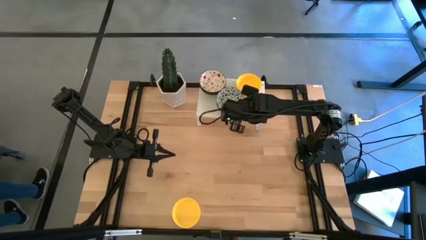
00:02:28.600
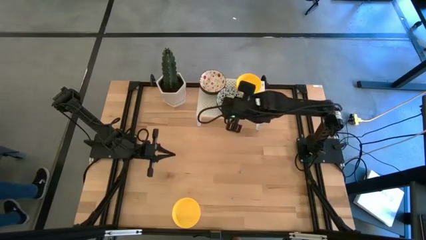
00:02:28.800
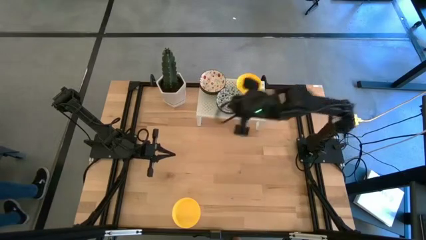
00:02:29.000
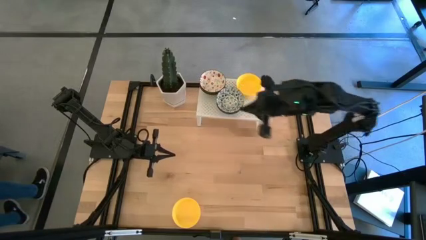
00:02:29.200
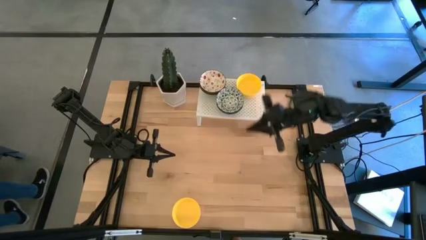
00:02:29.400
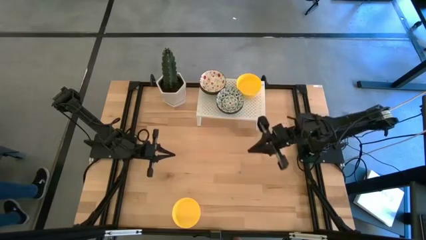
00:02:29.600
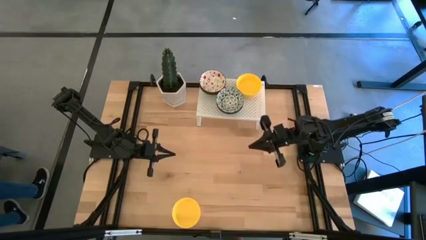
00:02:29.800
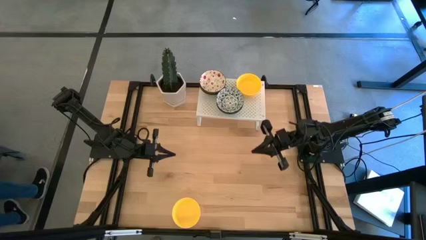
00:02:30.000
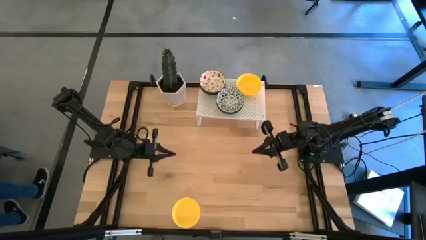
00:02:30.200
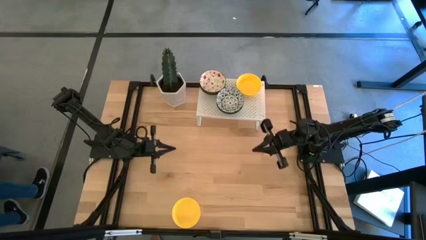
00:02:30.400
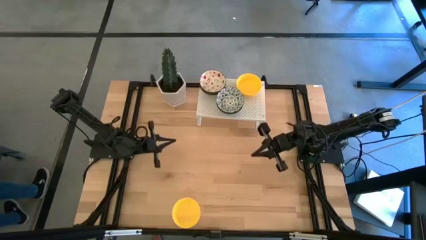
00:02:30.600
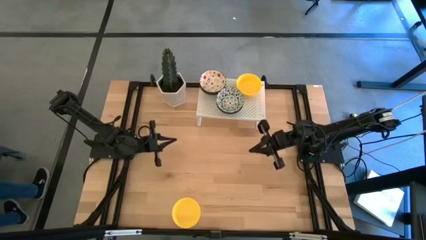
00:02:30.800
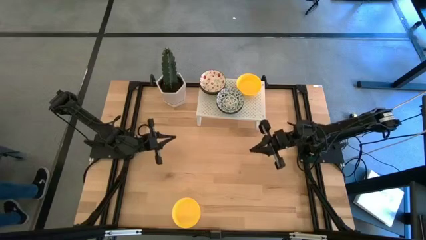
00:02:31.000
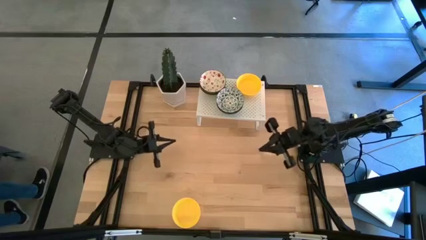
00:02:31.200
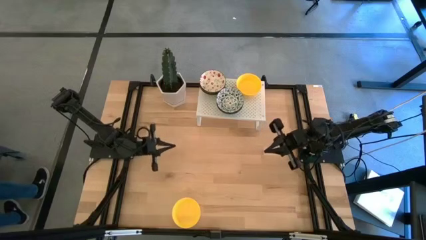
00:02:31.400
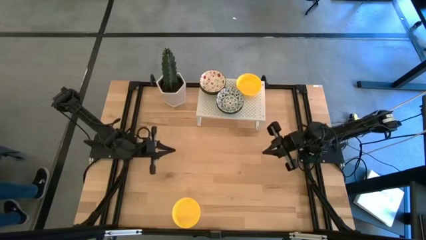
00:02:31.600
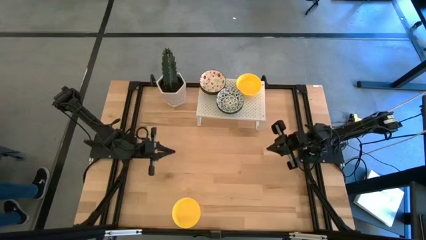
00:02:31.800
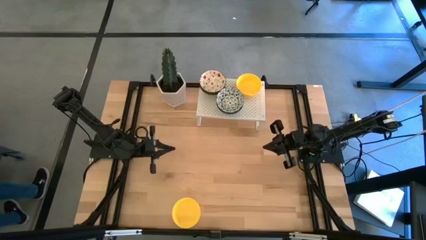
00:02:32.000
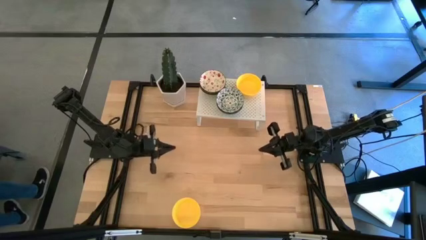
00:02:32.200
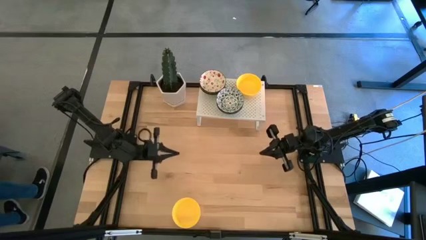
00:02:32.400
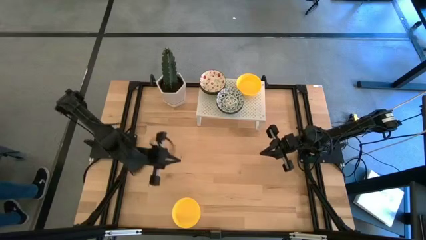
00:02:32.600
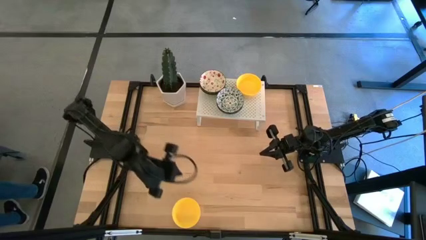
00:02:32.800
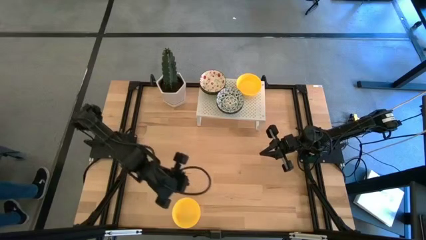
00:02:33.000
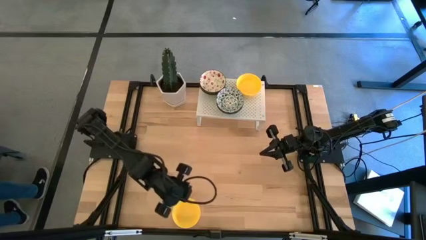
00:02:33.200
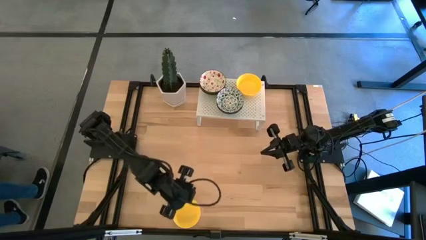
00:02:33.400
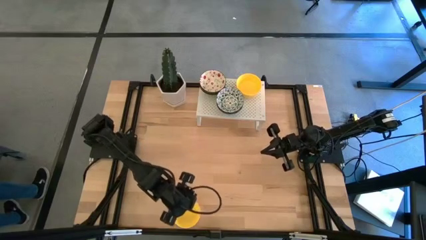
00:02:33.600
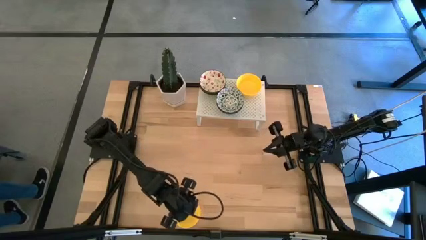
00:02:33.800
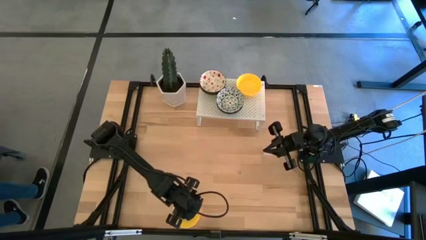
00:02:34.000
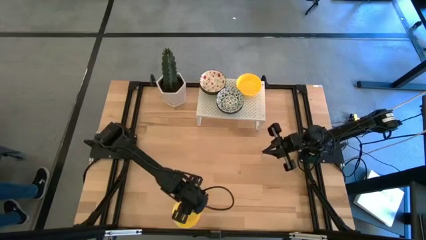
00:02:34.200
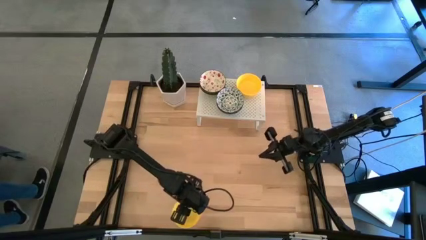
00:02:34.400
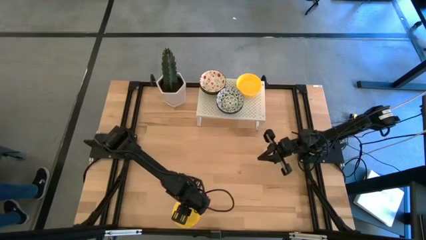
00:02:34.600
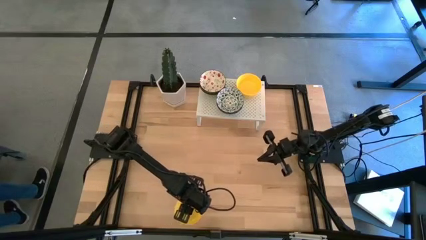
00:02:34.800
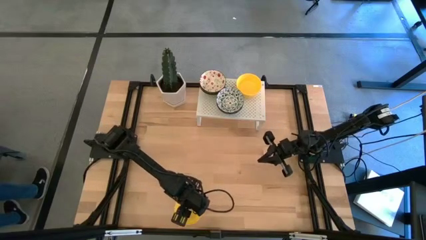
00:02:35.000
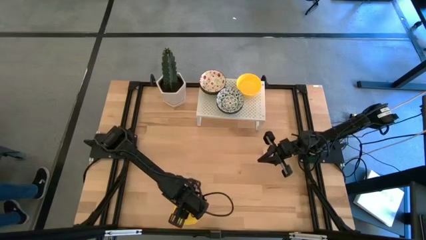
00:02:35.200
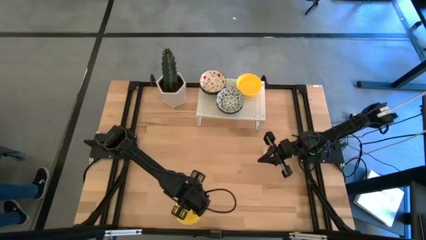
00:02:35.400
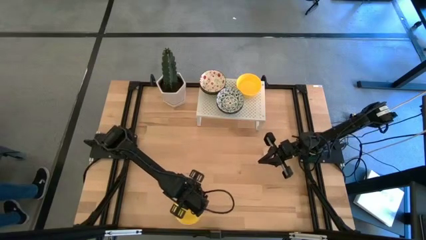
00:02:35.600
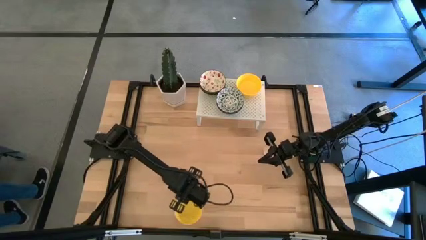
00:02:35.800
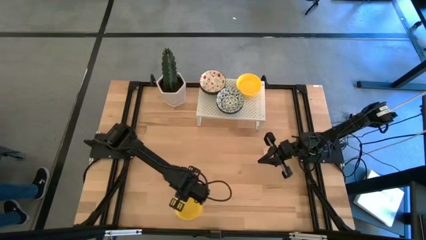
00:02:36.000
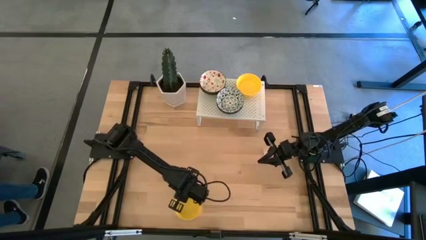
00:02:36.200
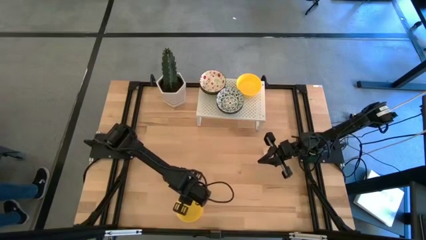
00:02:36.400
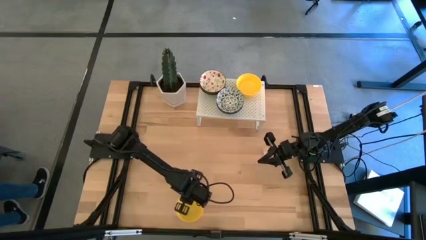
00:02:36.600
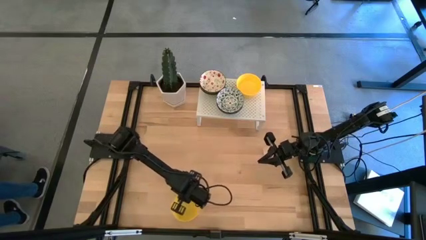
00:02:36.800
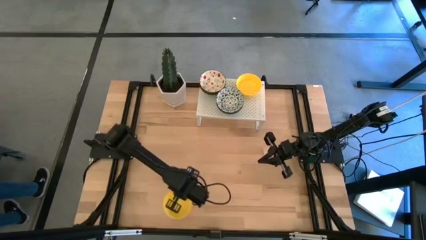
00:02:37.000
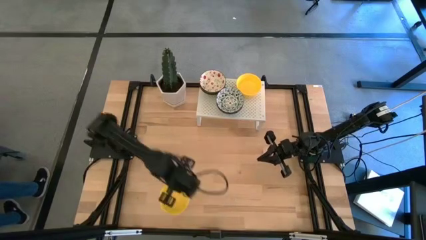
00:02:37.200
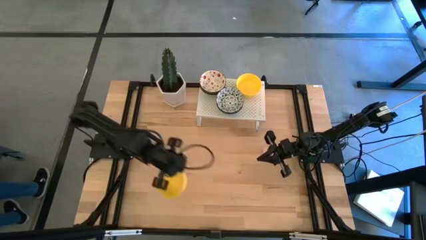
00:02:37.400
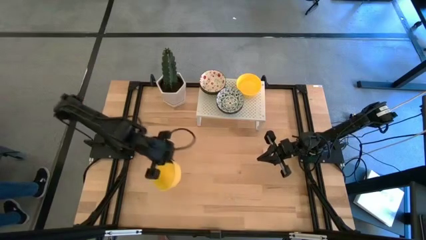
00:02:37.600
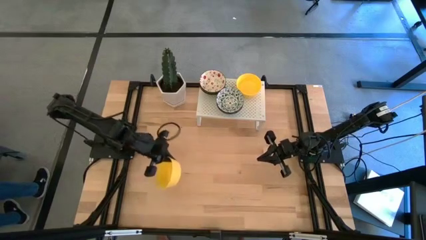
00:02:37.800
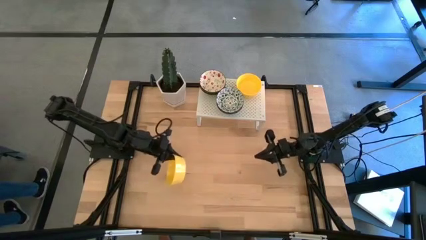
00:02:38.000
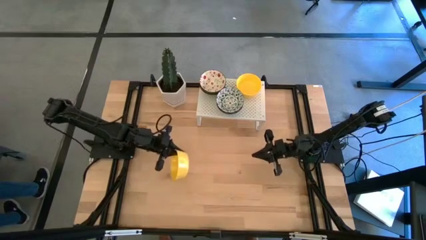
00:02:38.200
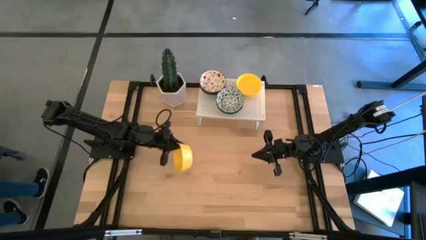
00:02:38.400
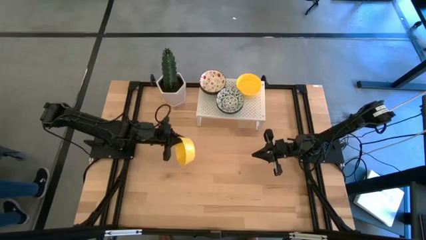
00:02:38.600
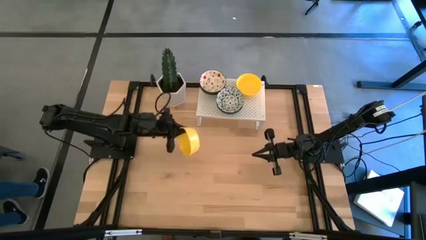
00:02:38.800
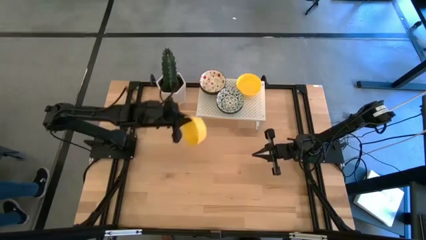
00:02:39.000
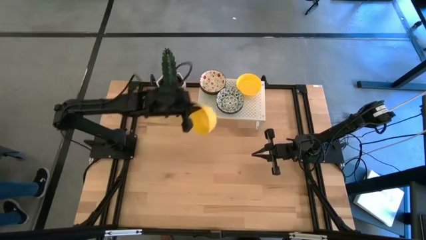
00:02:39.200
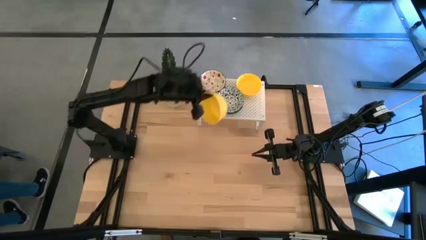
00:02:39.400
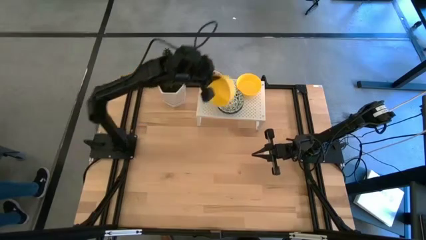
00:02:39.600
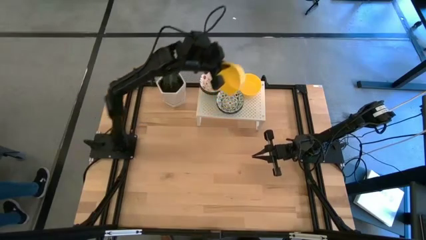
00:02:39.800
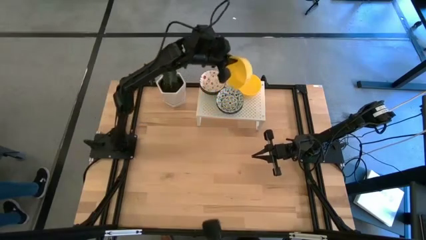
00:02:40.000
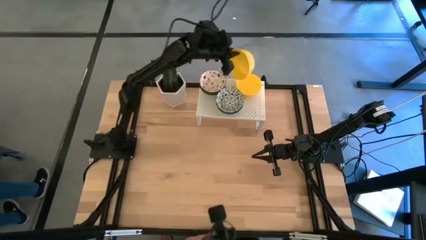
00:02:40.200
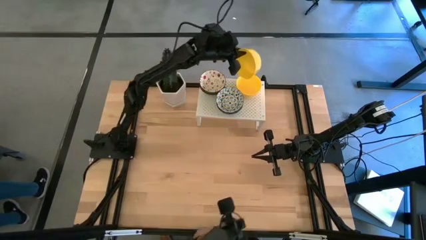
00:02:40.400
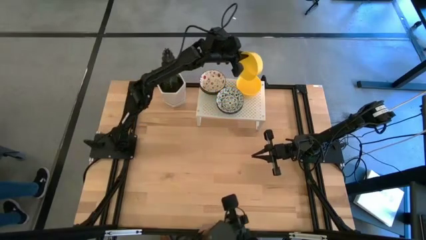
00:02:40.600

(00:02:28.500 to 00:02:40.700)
Task: Pick & Place Mini bowls
Stack the yellow bowl on the yellow bowls on the shelf
